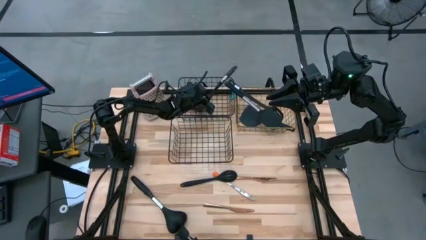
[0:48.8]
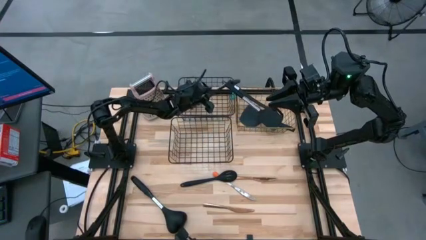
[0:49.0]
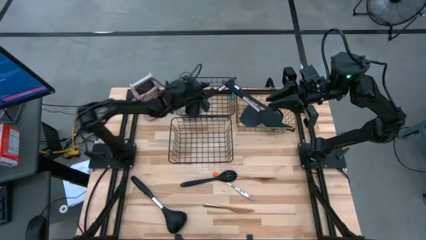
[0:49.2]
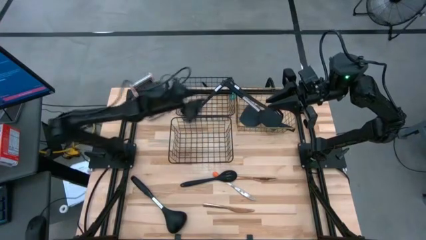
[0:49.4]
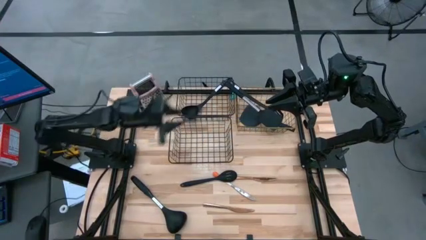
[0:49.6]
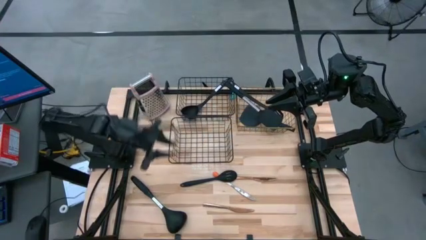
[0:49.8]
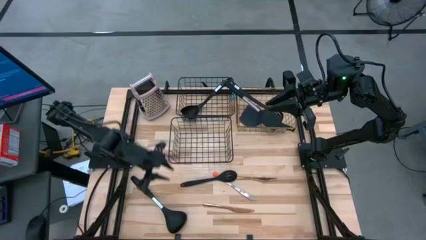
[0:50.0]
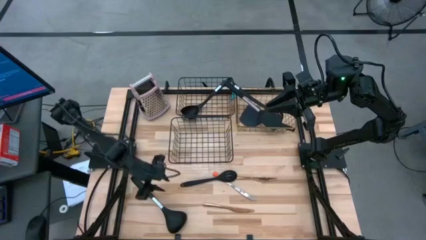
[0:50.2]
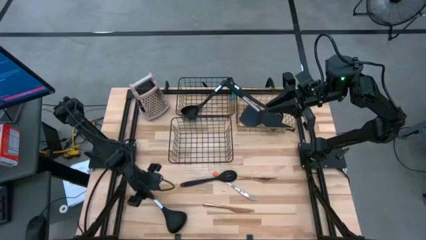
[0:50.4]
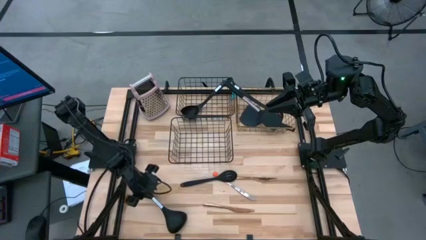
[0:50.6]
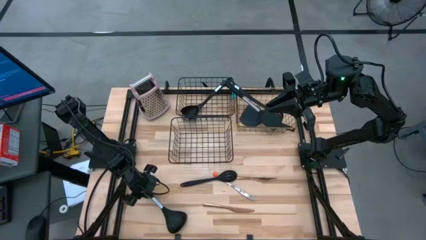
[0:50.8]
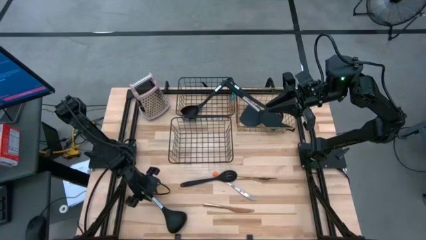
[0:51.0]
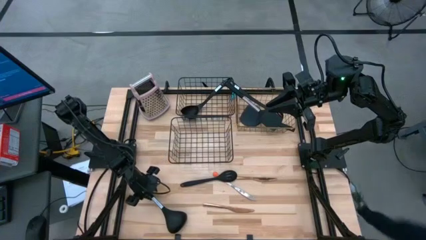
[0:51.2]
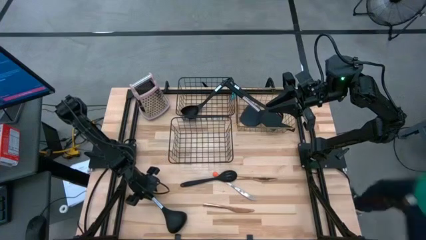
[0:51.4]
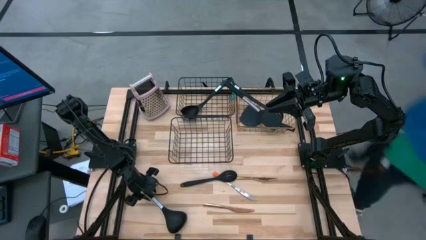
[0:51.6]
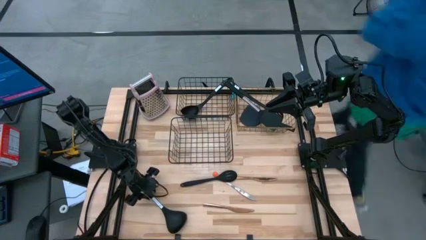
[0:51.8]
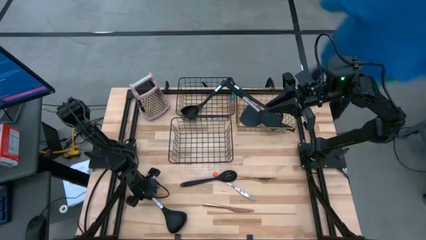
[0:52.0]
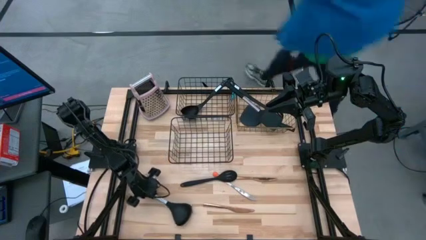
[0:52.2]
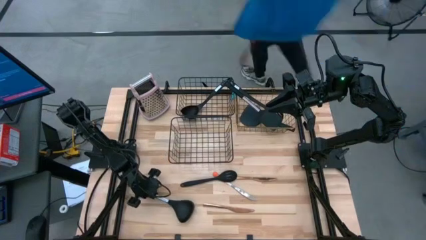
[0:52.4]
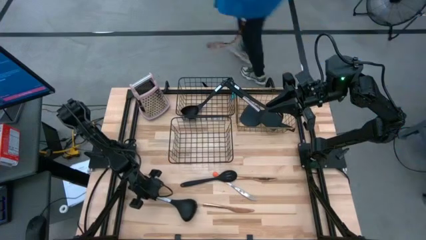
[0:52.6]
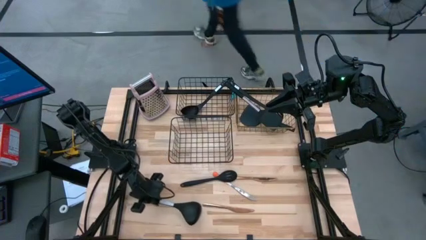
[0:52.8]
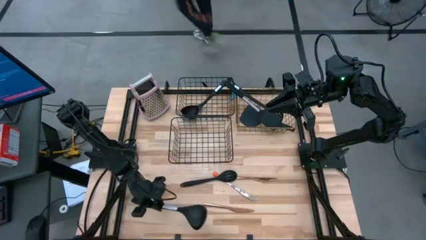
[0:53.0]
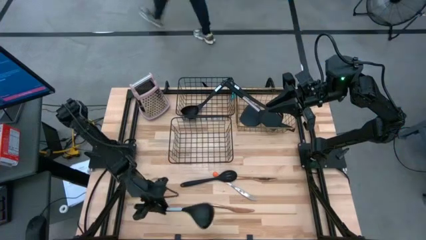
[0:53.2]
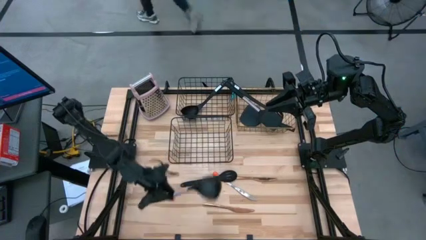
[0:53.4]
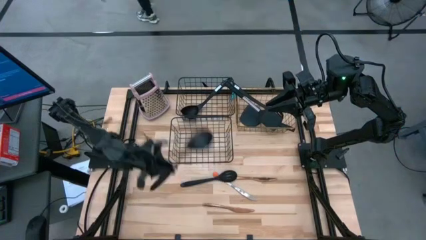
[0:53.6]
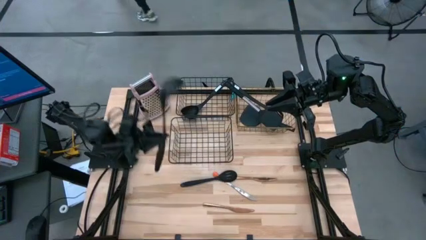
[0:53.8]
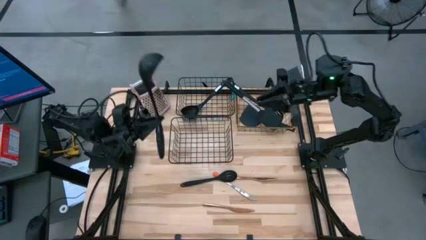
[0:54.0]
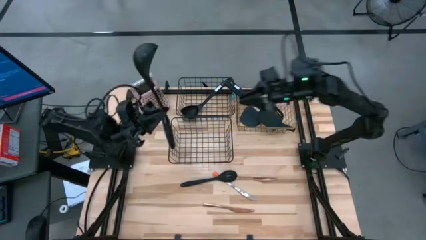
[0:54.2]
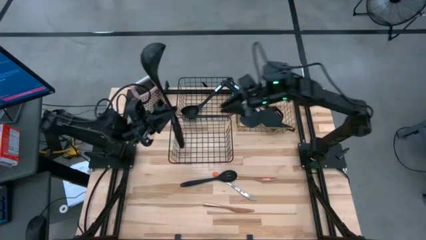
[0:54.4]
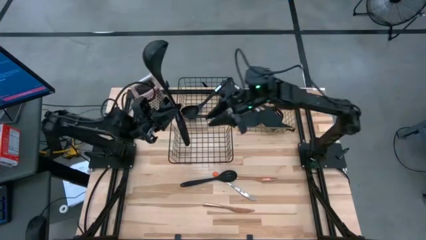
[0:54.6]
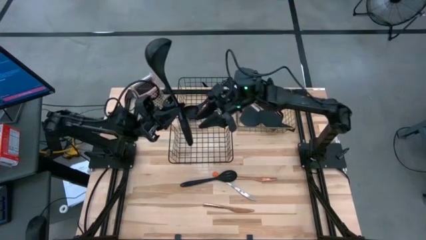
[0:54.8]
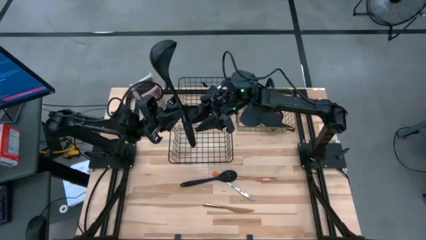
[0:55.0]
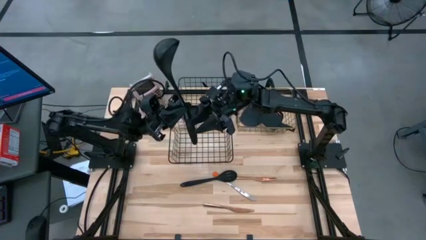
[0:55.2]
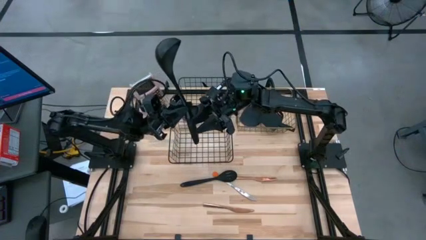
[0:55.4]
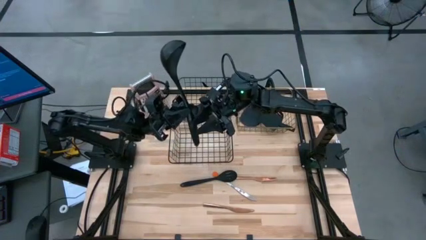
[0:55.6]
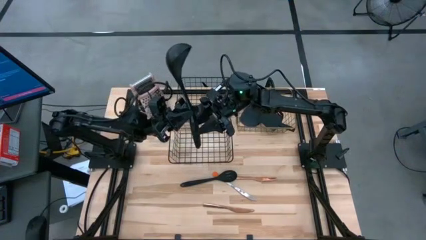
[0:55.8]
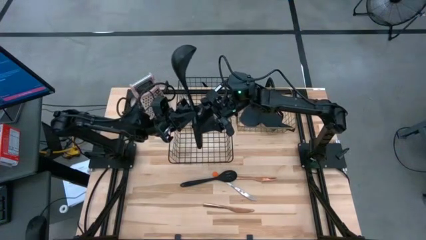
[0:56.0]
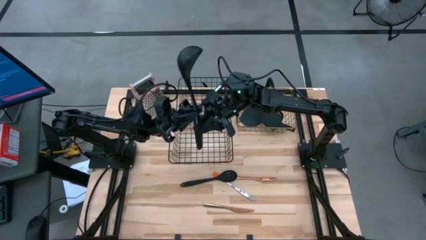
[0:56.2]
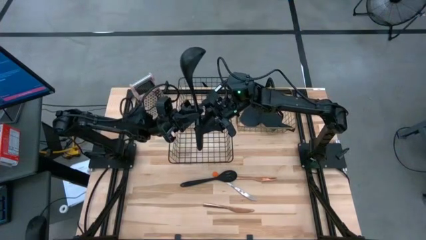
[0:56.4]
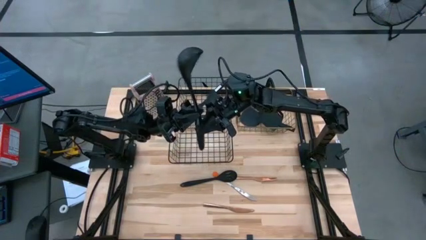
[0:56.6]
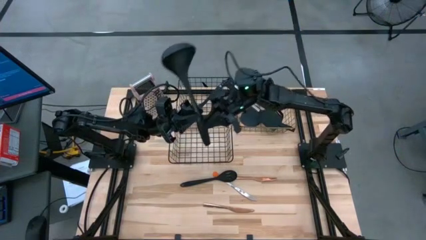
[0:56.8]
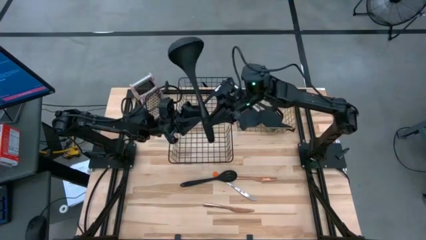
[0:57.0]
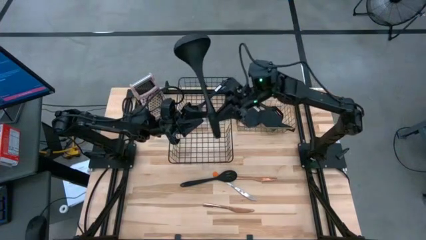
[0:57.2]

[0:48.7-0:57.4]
Task: Pick & Place Kitchen Items
Put the serving spoon into the top left wire basket

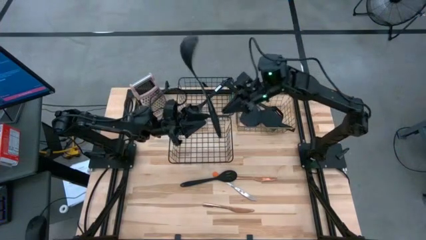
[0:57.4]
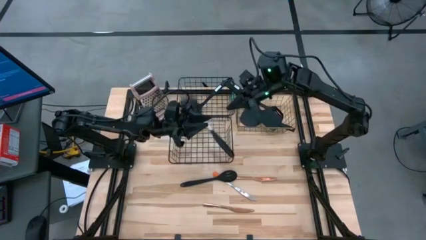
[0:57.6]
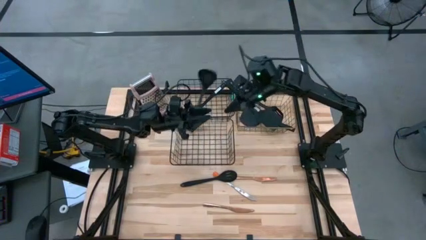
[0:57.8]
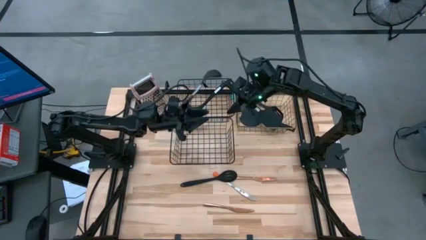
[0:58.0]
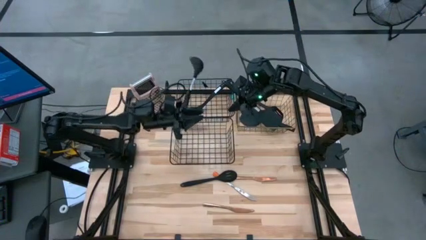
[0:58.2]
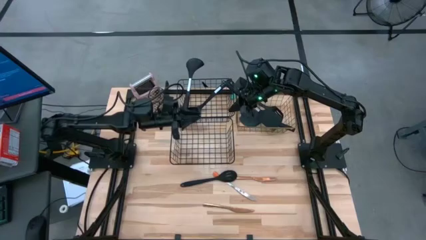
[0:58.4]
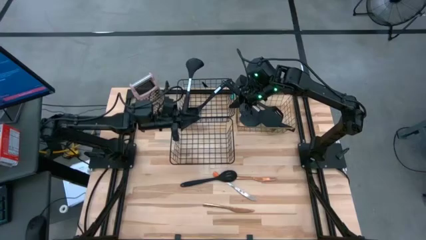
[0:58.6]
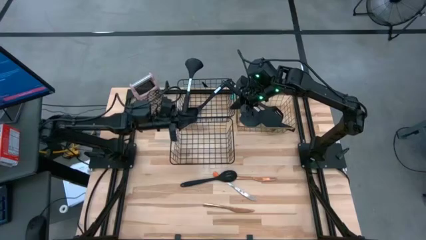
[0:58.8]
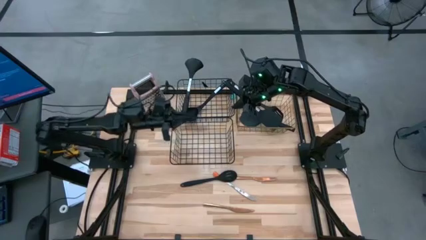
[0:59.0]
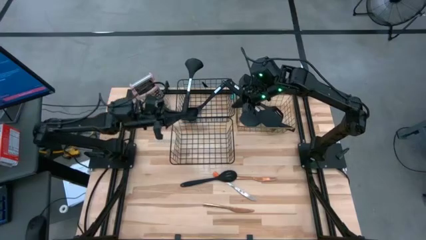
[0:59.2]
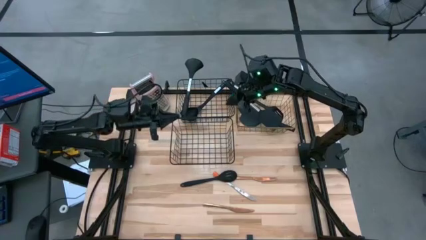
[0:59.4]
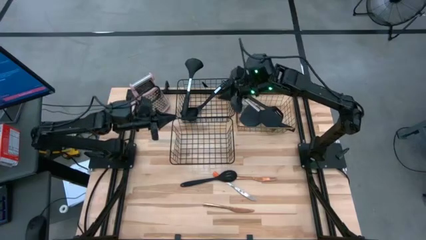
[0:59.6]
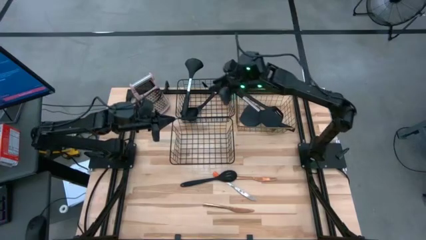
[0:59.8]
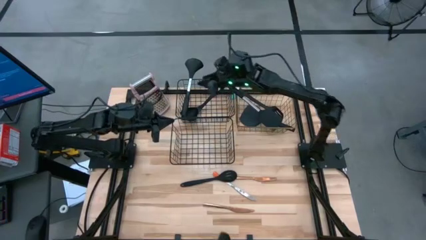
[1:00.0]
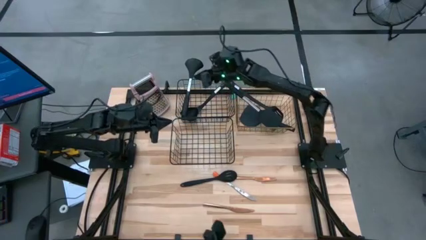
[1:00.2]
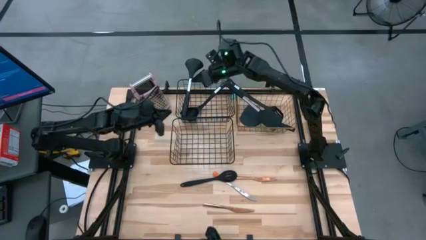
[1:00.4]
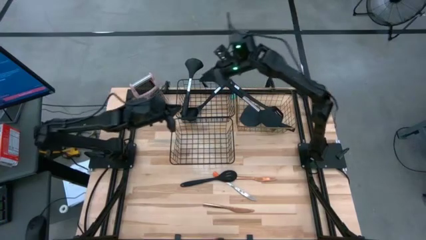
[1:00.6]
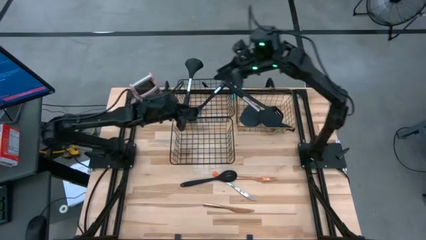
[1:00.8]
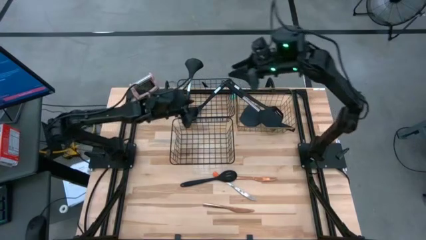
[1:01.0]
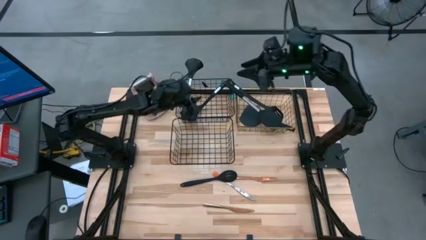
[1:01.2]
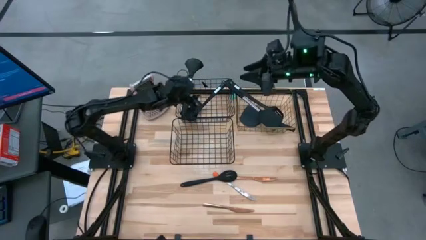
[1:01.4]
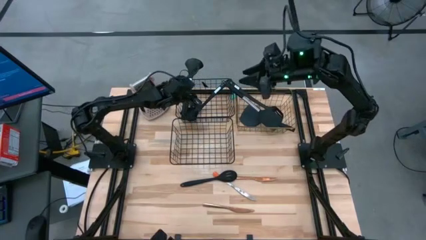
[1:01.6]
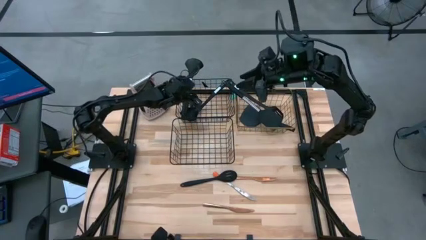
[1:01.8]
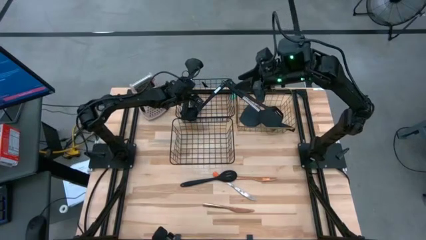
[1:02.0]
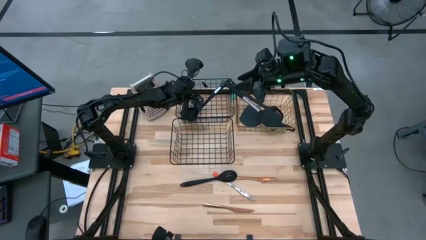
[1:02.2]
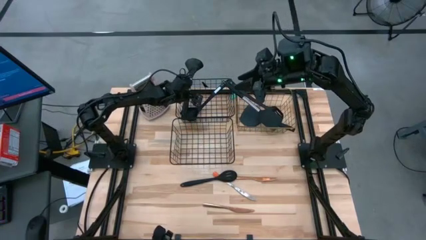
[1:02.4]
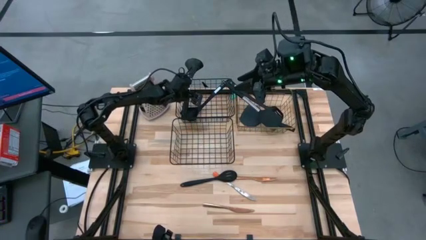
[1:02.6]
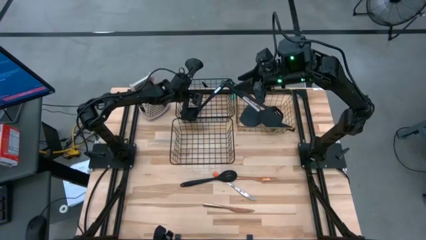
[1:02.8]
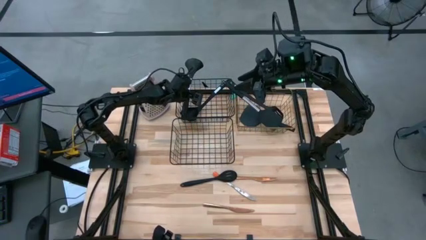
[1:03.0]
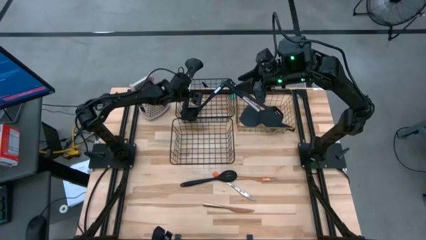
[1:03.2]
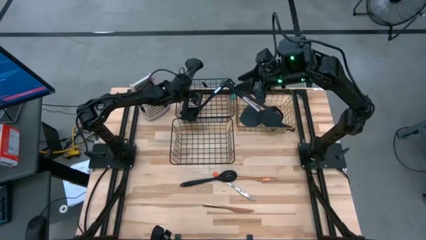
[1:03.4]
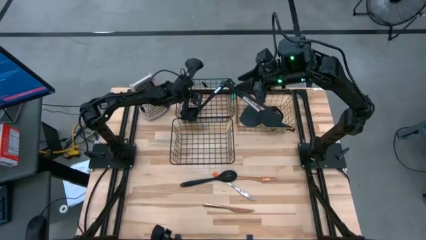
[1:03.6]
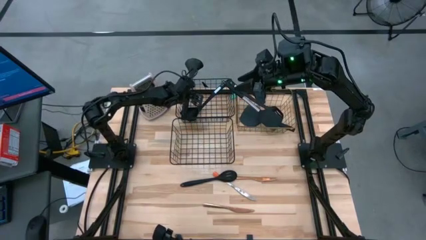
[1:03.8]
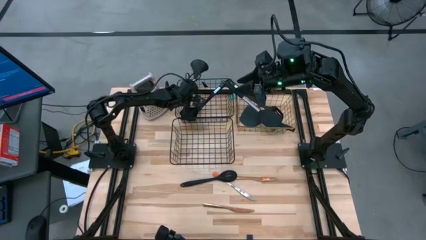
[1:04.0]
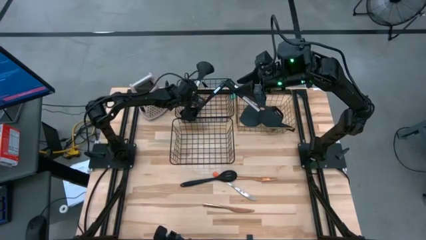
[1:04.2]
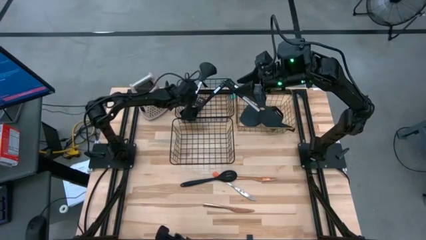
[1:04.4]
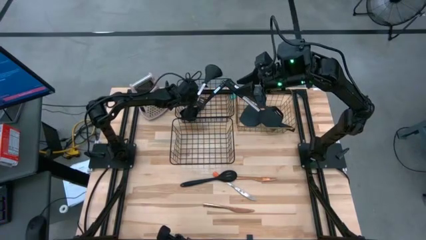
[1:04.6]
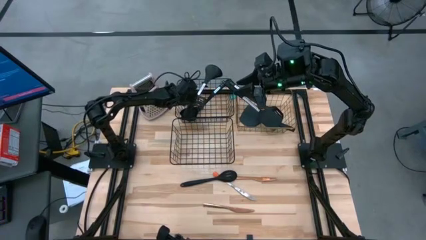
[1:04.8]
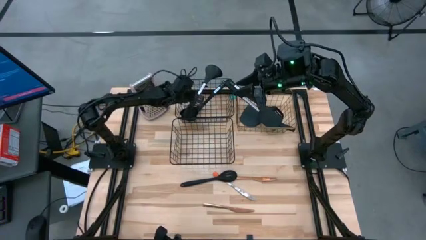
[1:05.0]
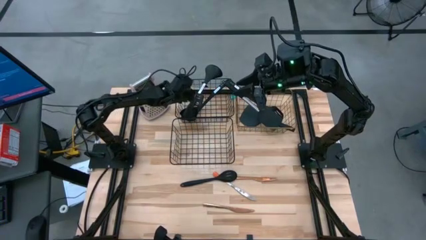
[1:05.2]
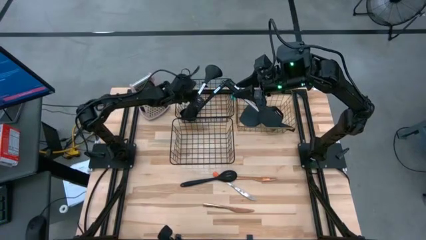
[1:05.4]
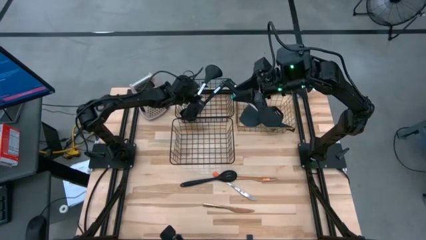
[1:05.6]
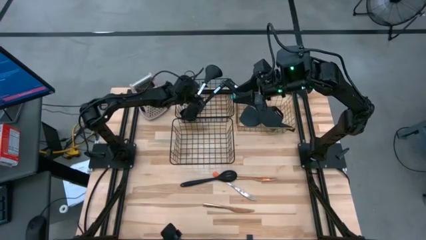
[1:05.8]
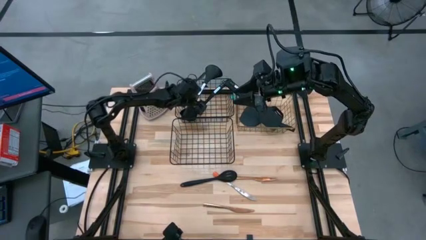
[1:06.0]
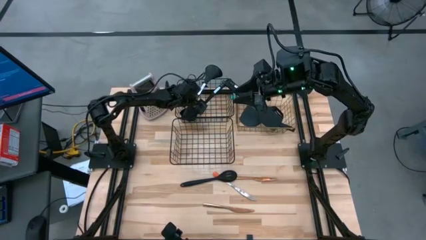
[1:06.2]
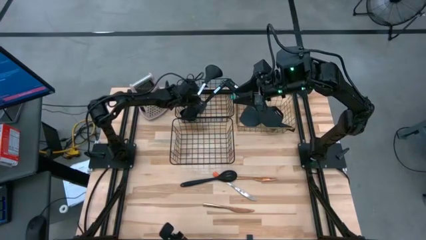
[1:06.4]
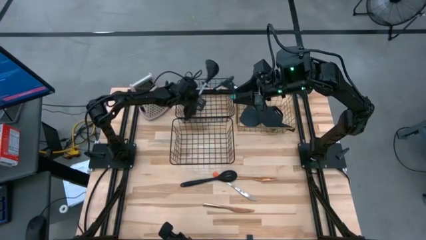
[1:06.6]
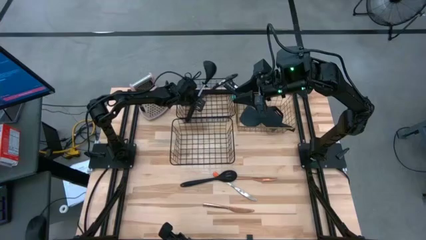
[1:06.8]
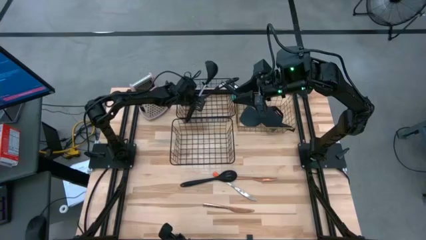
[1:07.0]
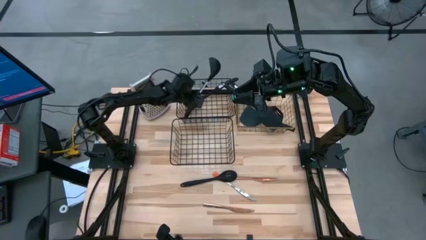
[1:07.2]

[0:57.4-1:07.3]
Put the serving spoon into the top left wire basket
